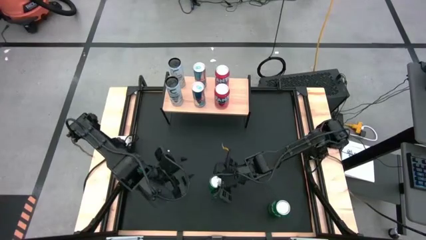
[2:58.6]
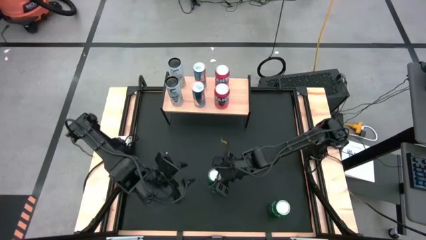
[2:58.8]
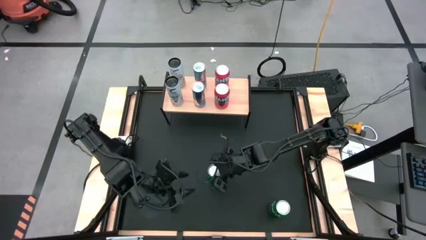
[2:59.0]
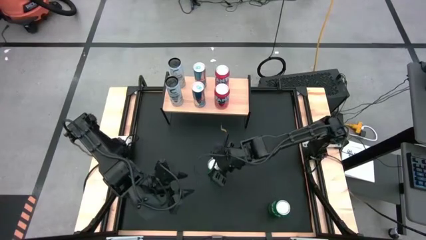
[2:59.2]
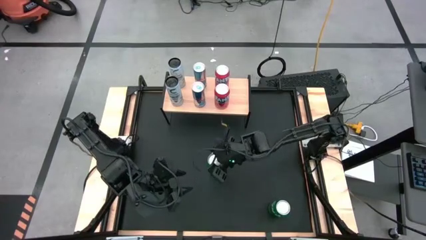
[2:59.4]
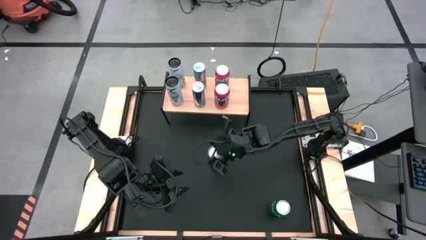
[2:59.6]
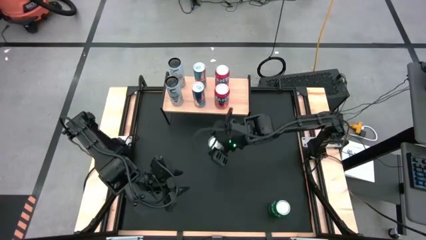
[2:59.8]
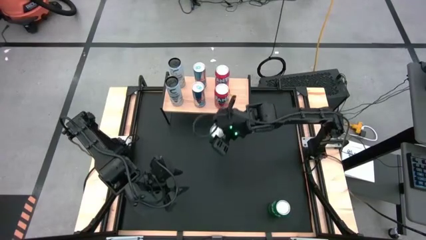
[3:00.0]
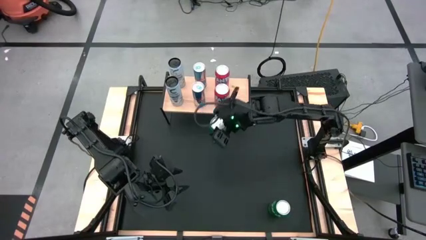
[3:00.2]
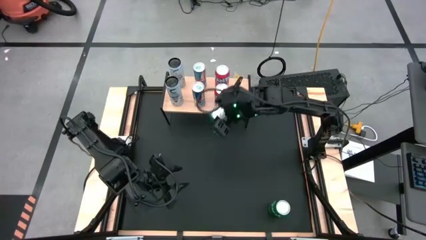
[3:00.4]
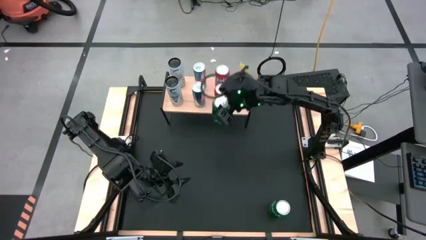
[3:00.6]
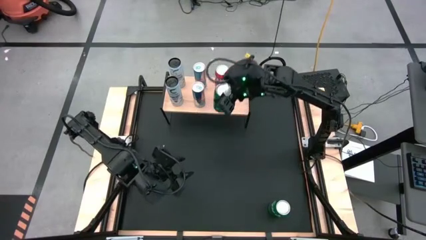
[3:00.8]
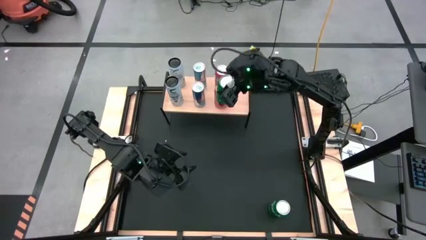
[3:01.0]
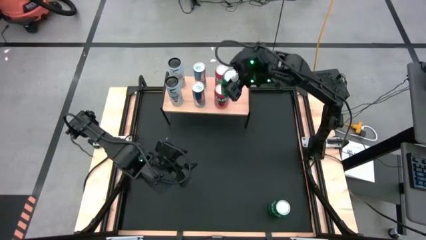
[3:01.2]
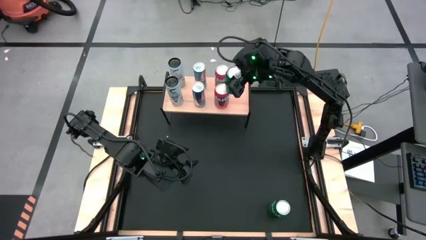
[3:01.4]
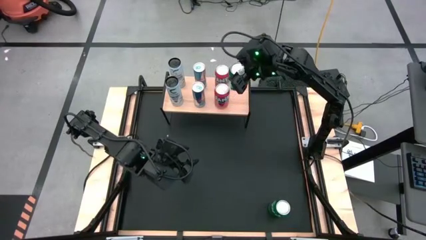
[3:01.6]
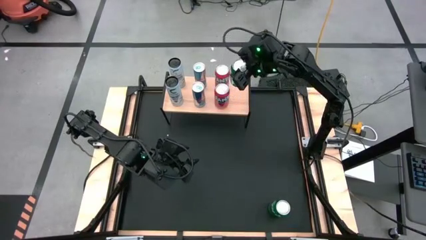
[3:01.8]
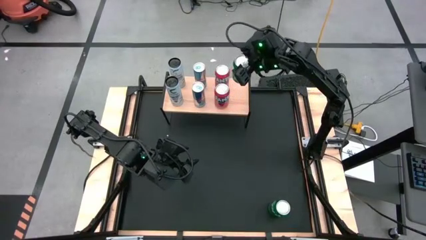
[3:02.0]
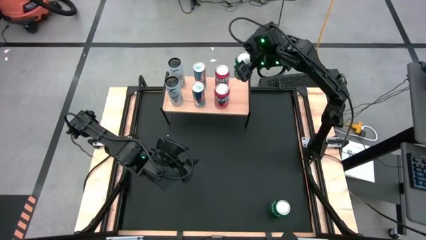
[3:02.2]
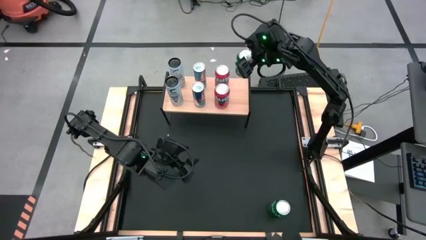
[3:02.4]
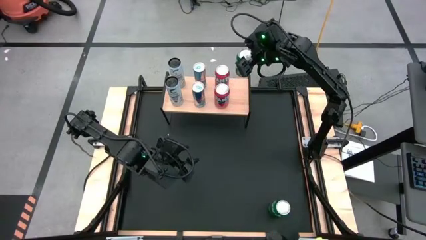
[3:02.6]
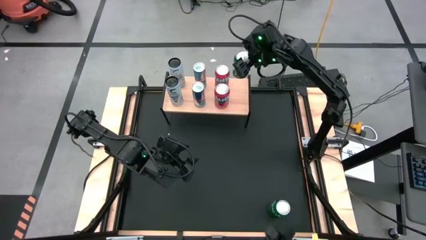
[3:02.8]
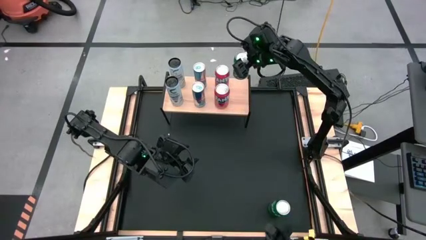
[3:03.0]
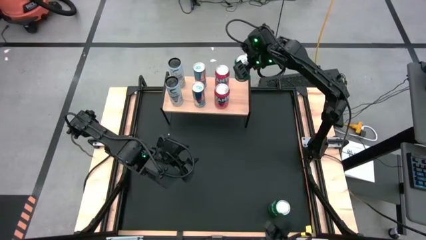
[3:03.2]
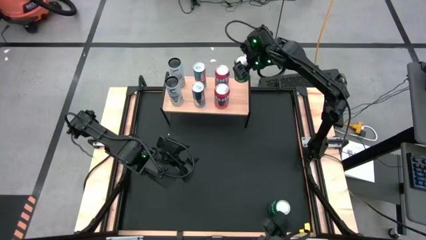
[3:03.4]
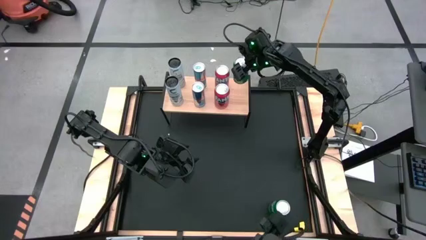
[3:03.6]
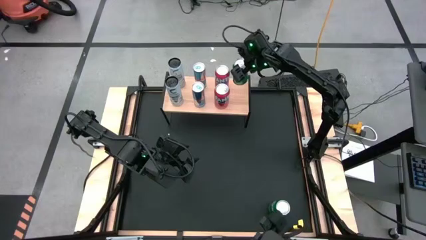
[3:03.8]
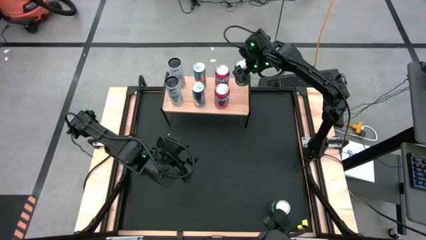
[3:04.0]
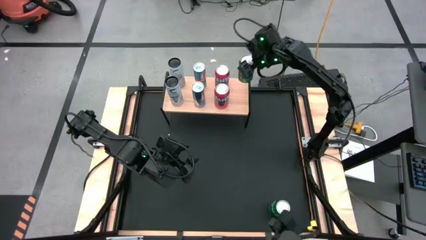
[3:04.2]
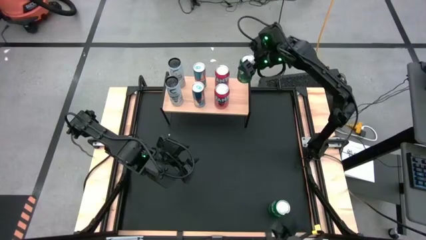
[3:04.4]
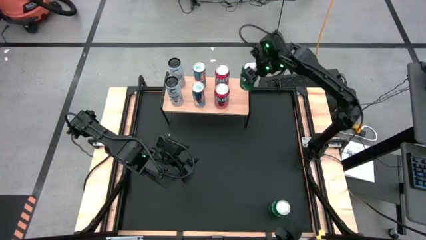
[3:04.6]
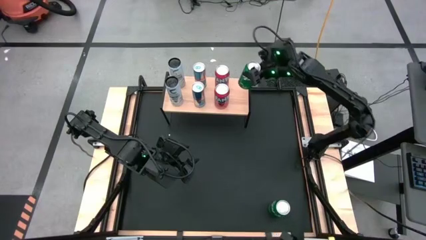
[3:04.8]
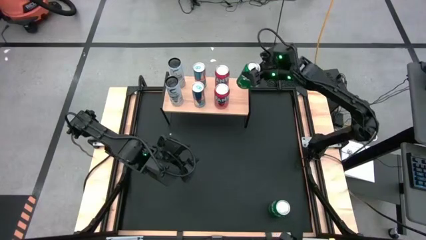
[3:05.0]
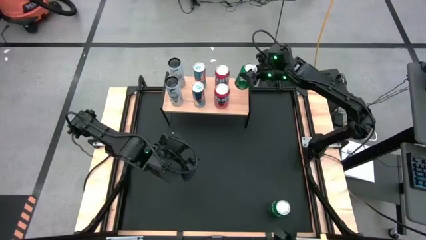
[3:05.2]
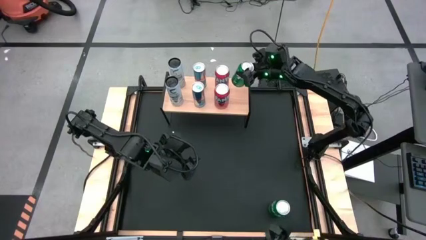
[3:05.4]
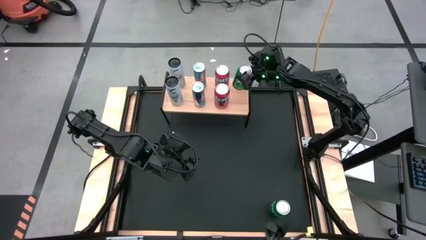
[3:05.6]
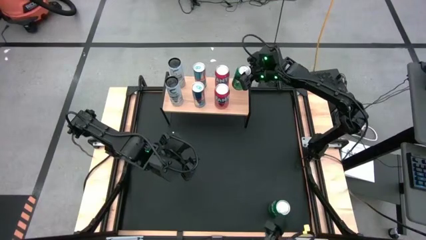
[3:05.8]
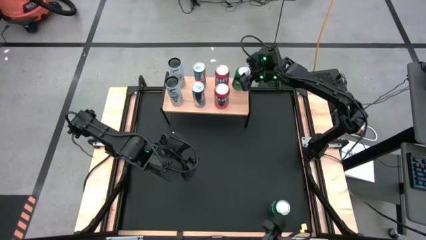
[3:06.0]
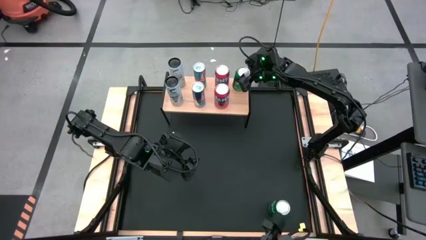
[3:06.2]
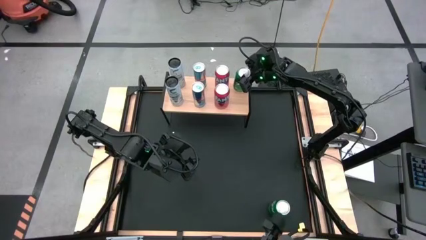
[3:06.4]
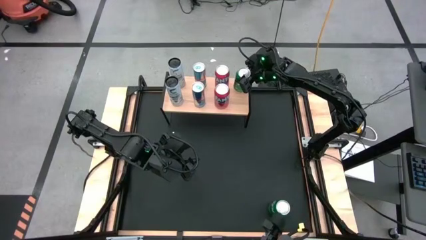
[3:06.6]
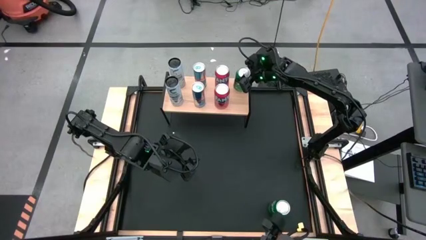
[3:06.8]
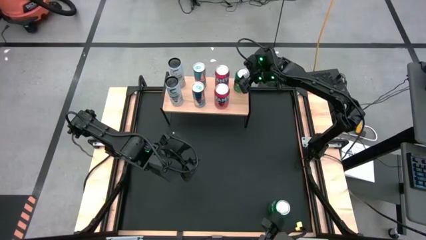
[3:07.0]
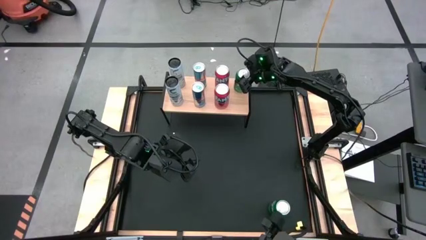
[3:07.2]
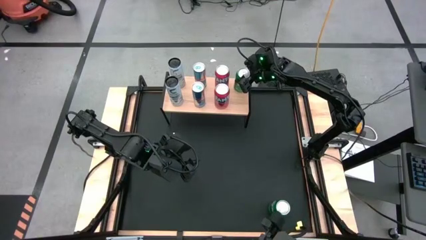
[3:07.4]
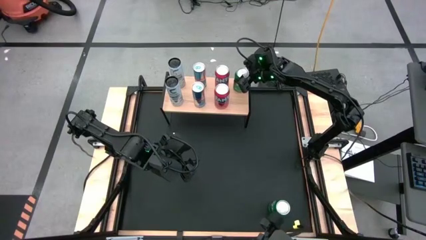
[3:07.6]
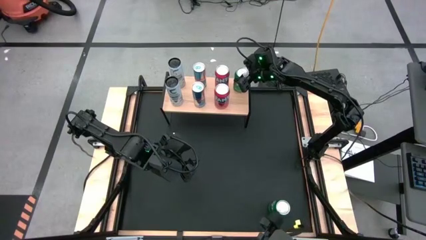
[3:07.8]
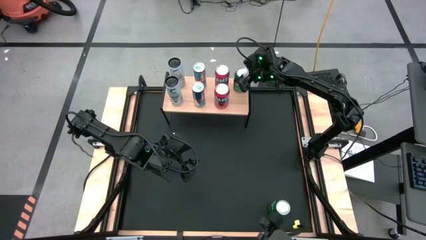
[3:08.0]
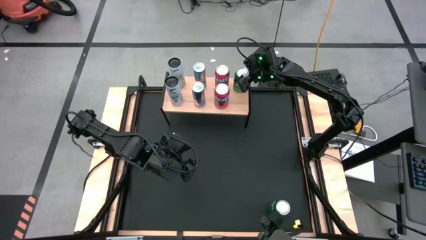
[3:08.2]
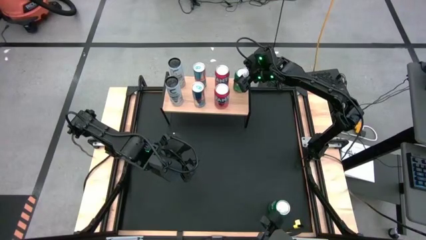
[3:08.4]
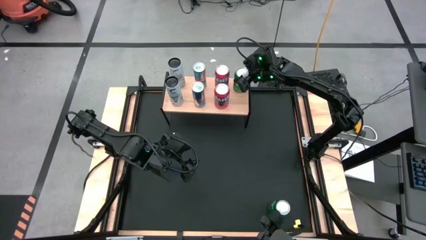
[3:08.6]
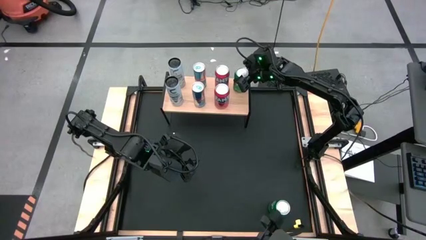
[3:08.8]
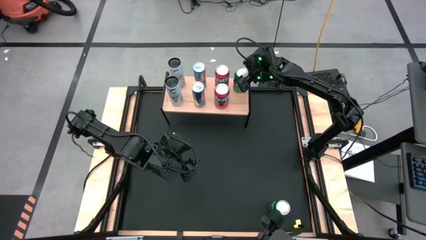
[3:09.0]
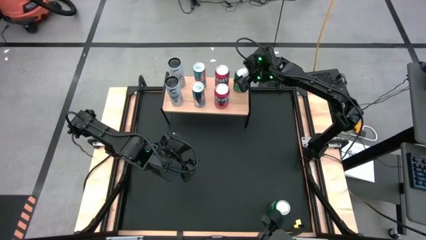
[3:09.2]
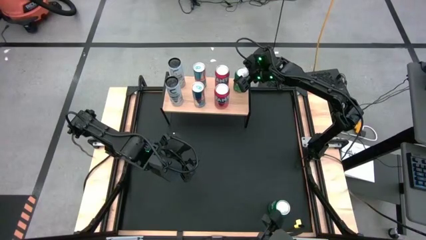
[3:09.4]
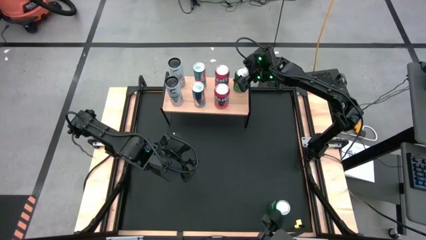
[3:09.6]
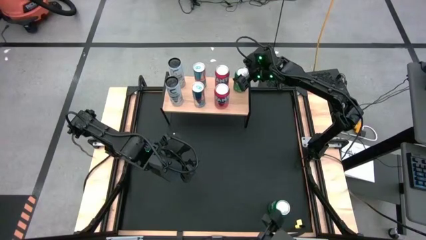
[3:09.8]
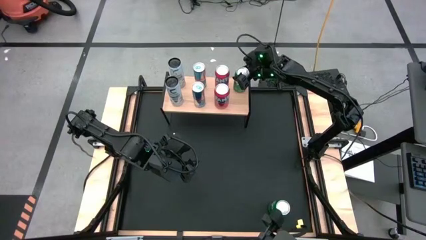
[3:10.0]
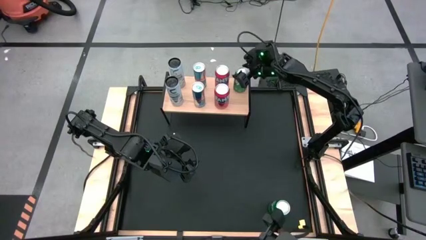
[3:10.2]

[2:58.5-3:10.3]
Task: Place canned beverage on shelf
Put the left green soda can on the shelf

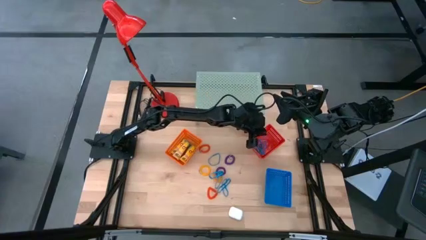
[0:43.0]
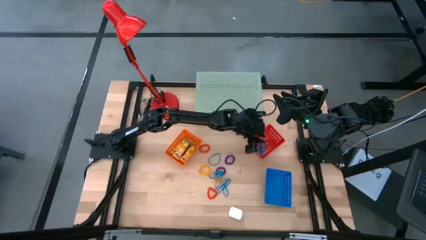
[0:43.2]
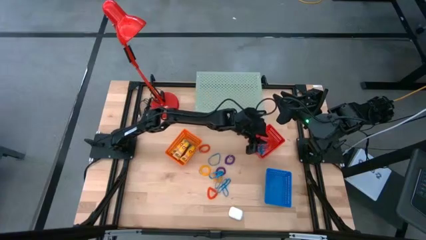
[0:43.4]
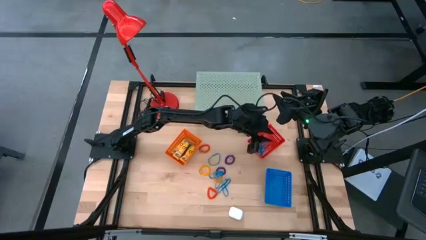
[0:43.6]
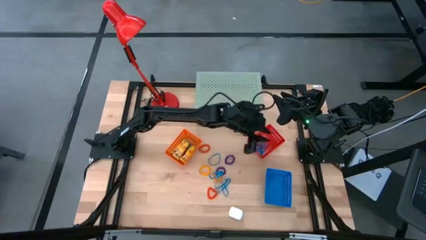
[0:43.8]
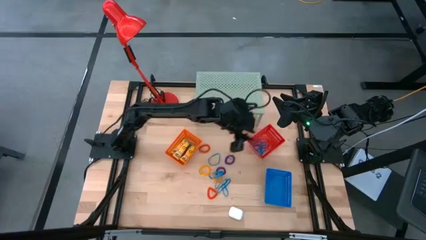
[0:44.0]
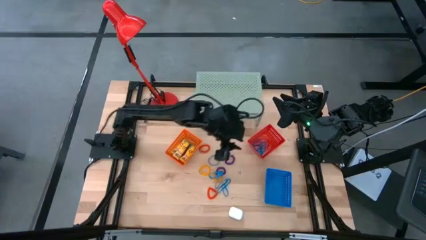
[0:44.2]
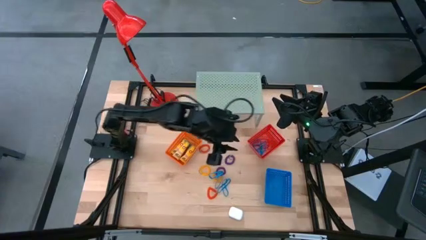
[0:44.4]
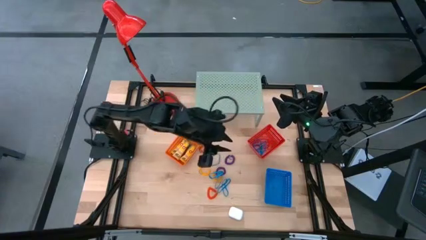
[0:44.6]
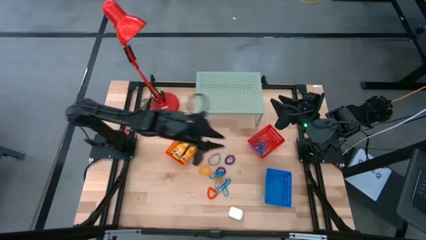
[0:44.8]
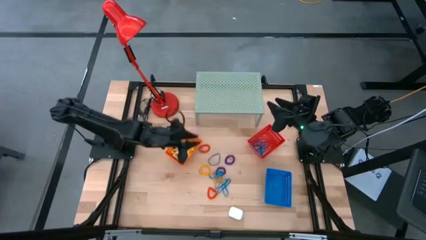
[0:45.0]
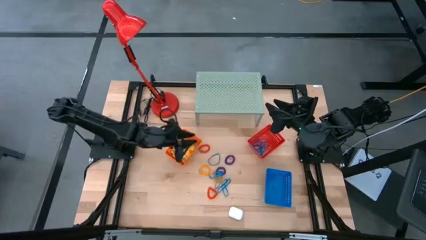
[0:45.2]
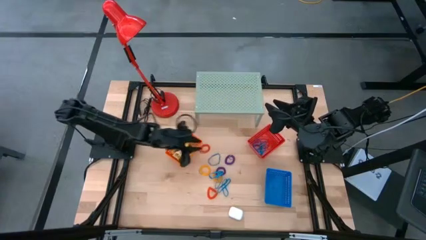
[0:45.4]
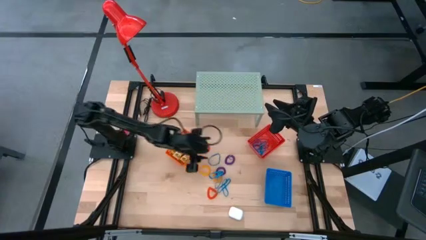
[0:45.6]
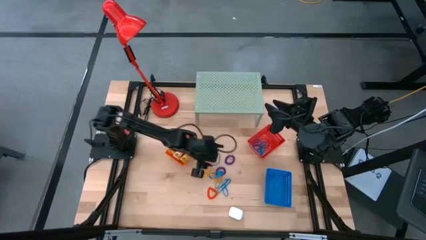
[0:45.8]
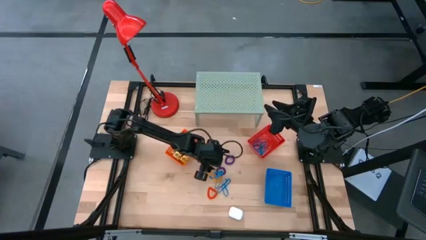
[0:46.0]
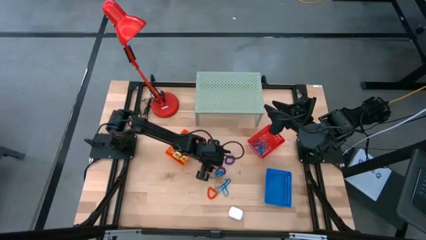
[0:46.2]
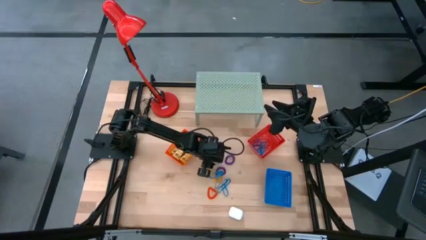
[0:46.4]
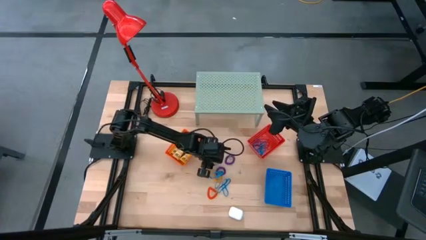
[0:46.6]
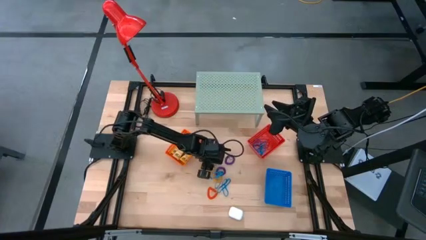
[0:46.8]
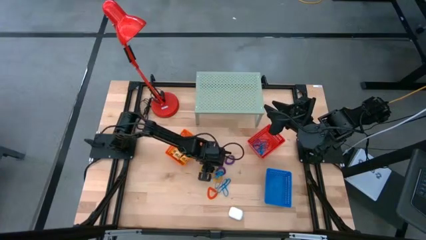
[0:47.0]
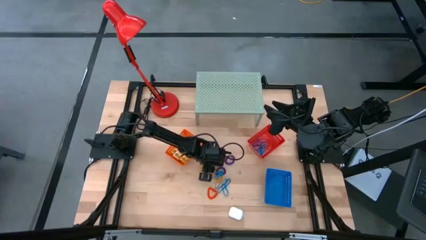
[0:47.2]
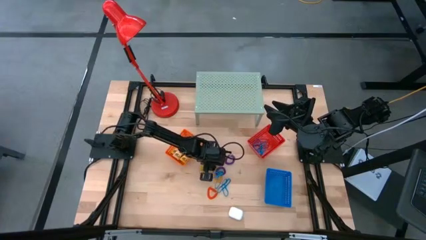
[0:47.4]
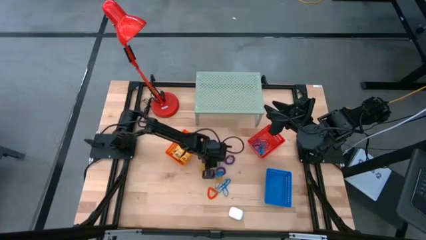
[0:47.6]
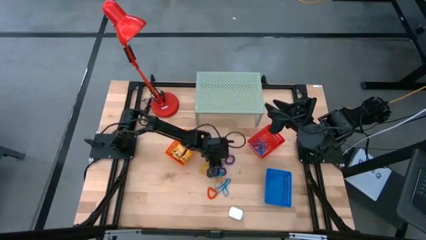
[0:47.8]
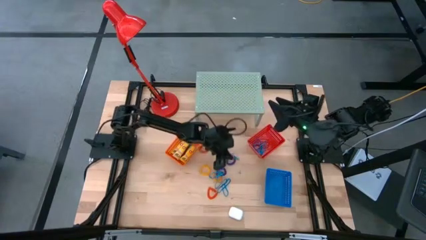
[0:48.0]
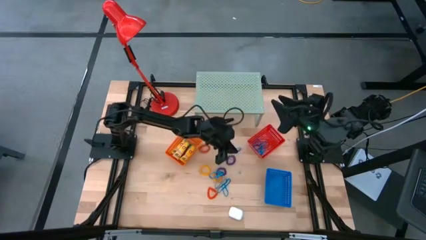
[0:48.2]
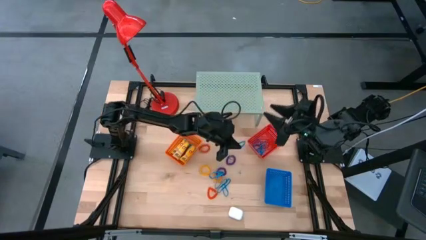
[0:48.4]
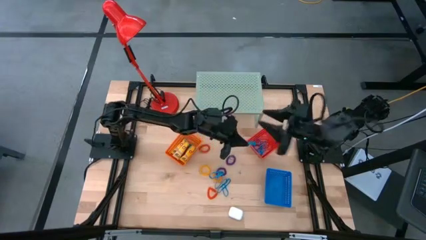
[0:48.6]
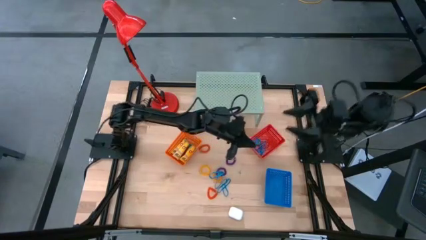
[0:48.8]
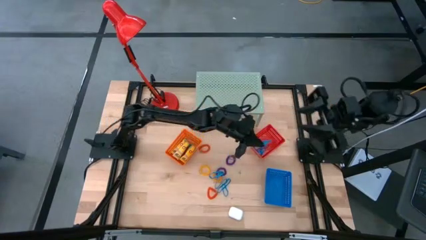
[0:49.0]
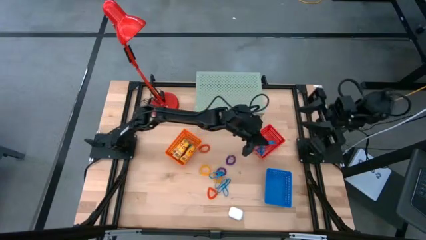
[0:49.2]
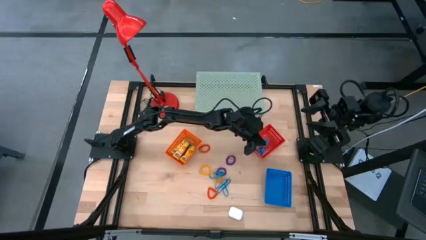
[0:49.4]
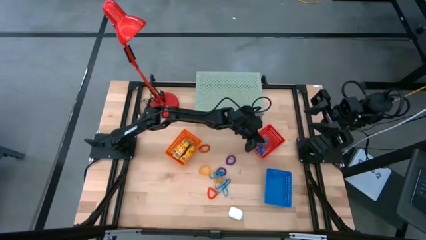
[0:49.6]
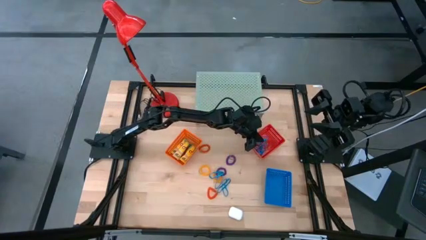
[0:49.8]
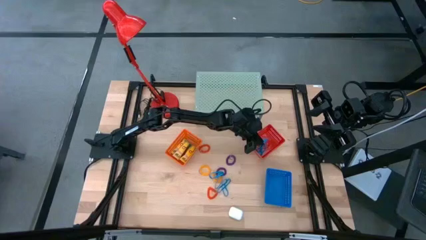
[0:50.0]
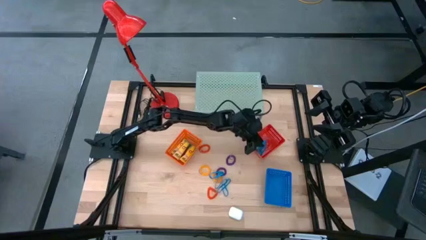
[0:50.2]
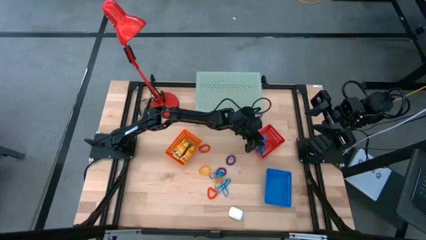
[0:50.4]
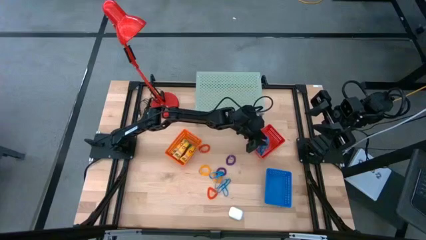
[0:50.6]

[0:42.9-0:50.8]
Task: Pick & Place Office Desk Supplies
Put the blue rubber band into the red bin
